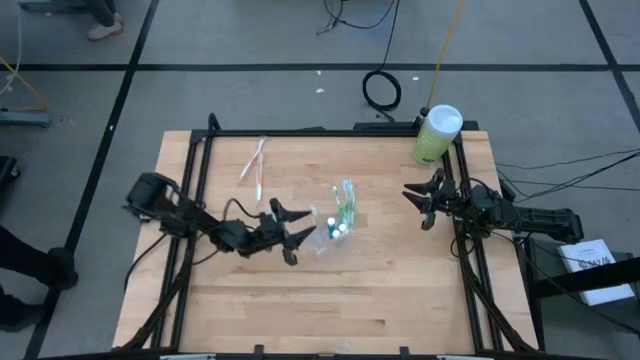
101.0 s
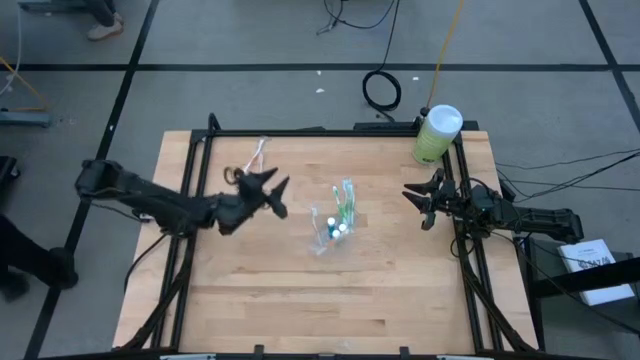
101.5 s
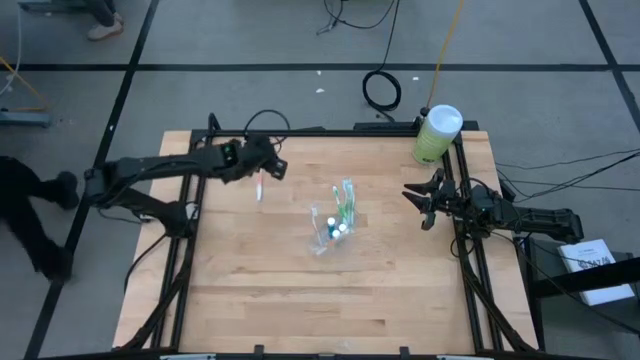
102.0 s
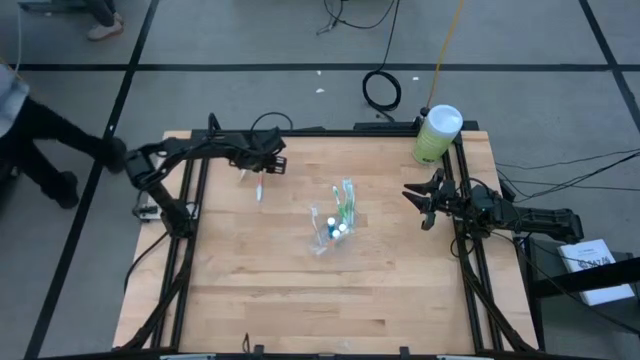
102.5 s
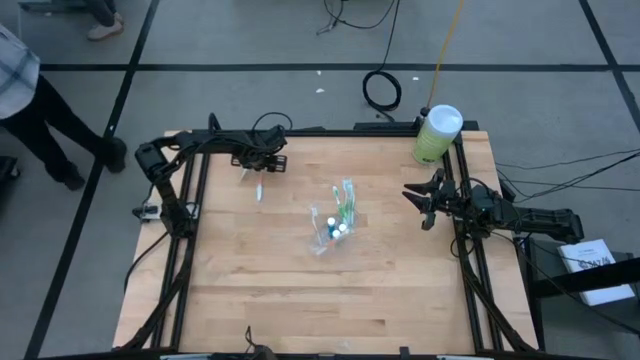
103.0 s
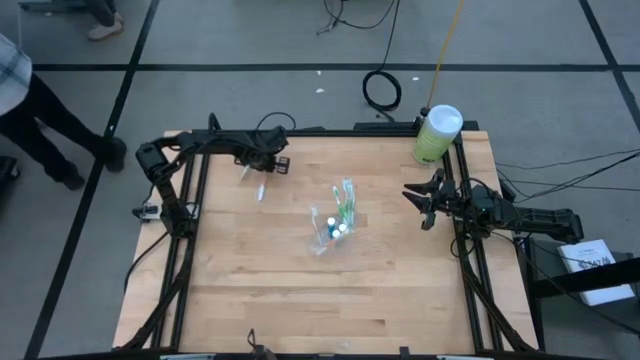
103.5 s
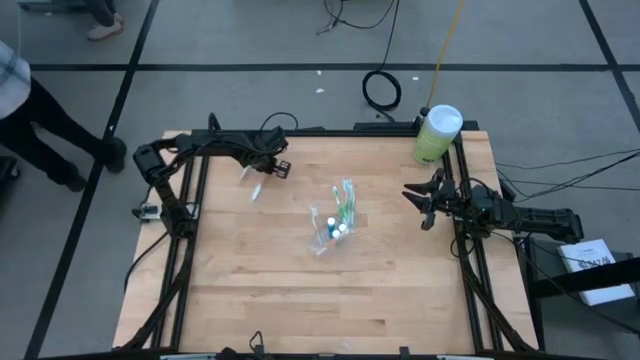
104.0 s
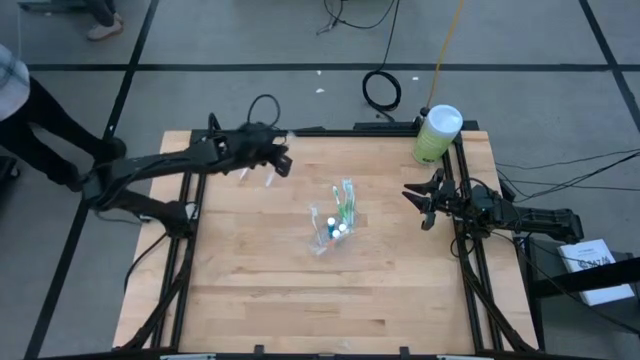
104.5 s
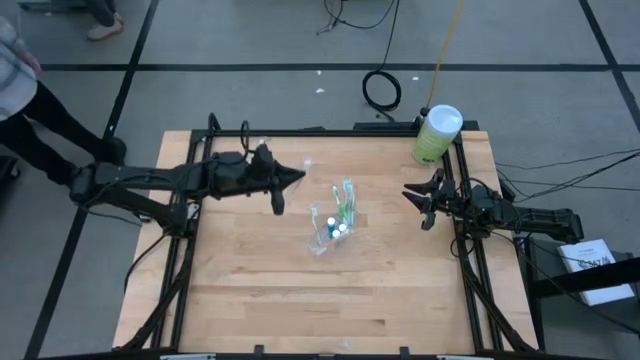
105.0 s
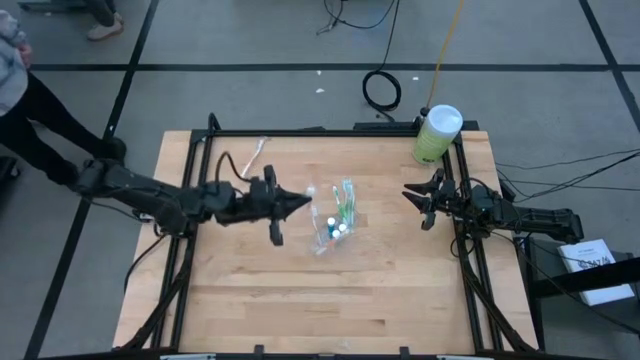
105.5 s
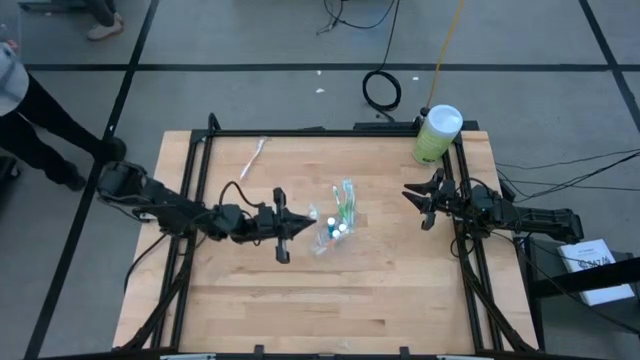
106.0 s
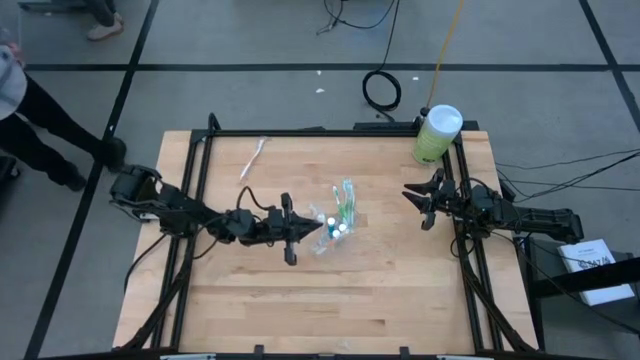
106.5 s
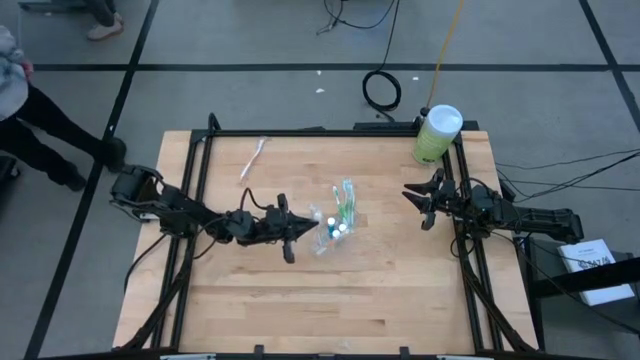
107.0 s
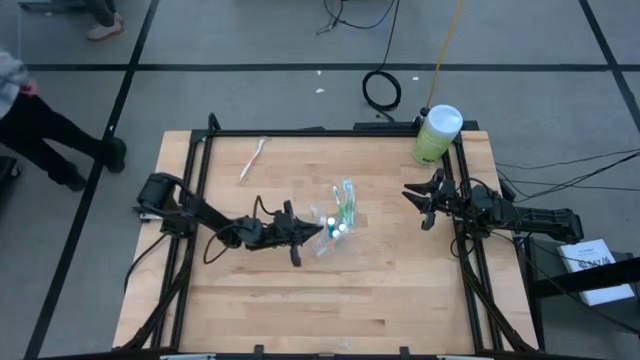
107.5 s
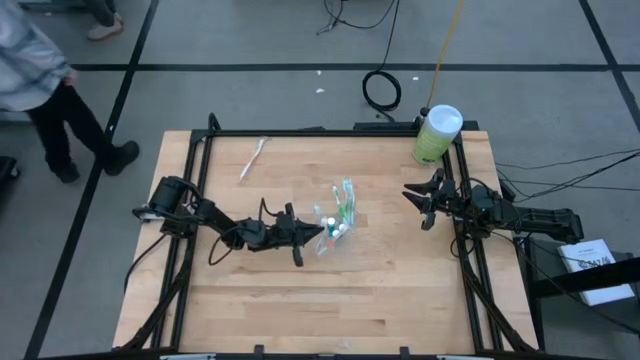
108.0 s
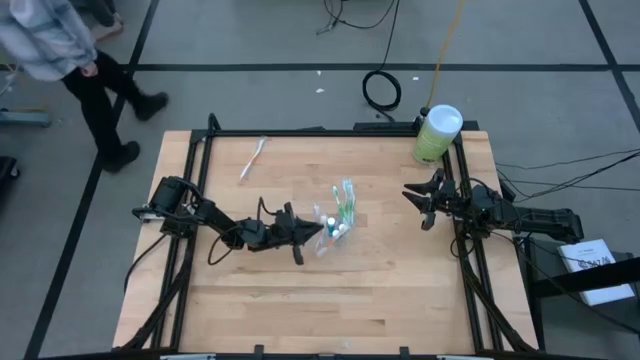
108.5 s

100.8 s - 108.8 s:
Task: Pick & Place toothbrushing station
Put the orange toothbrush into the transparent organizer

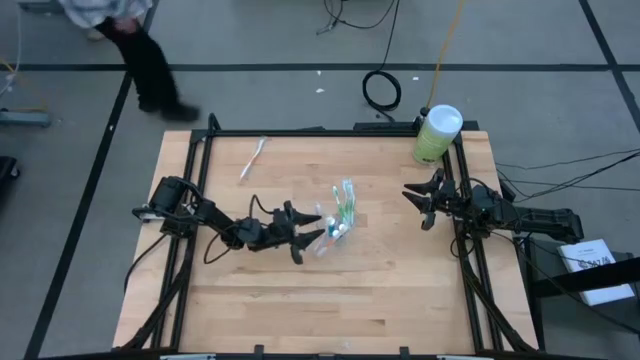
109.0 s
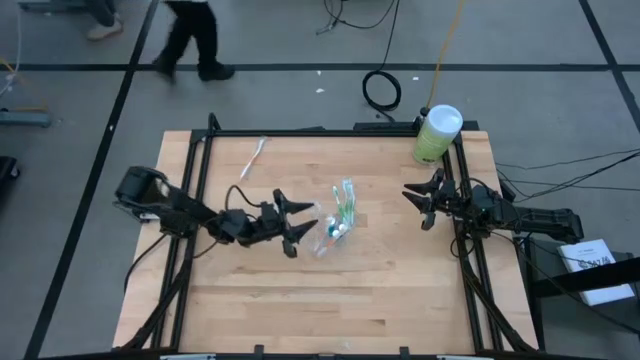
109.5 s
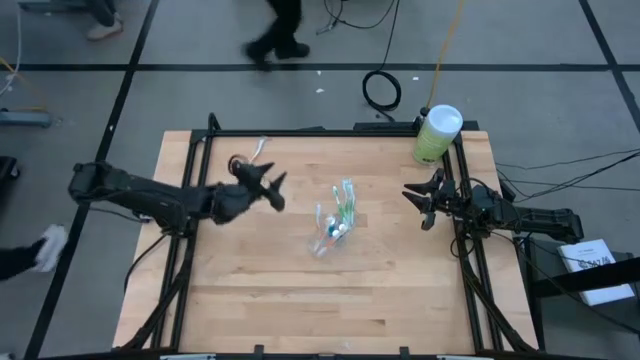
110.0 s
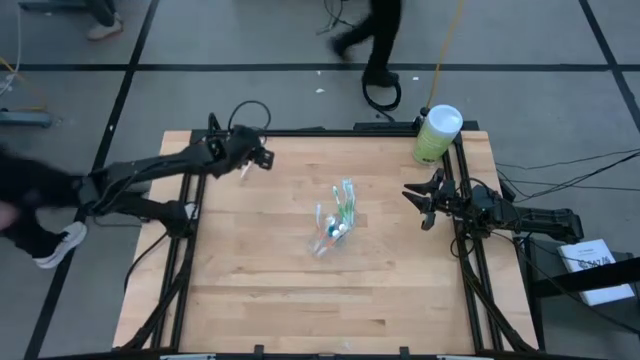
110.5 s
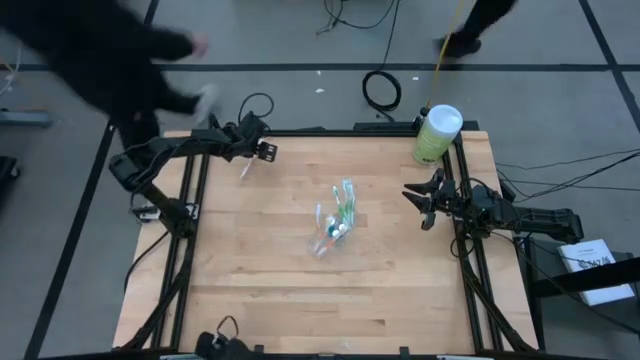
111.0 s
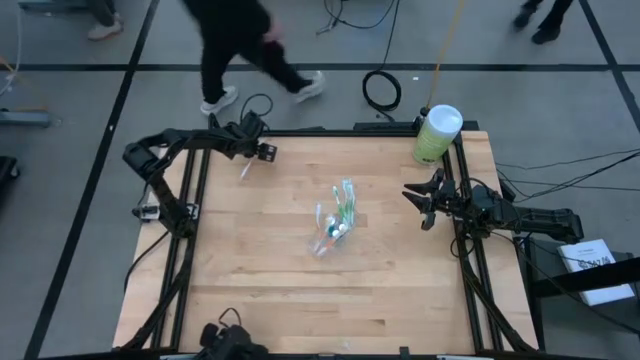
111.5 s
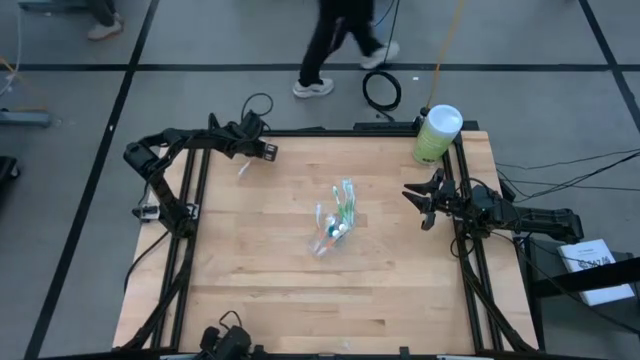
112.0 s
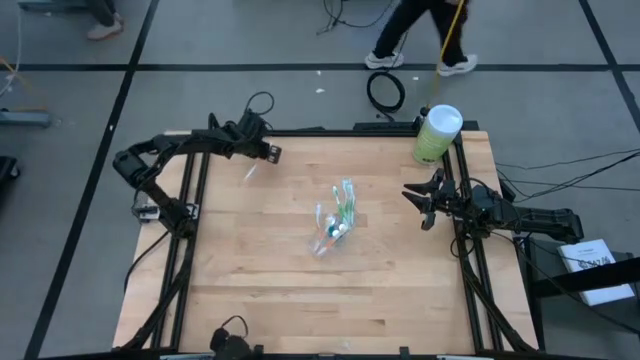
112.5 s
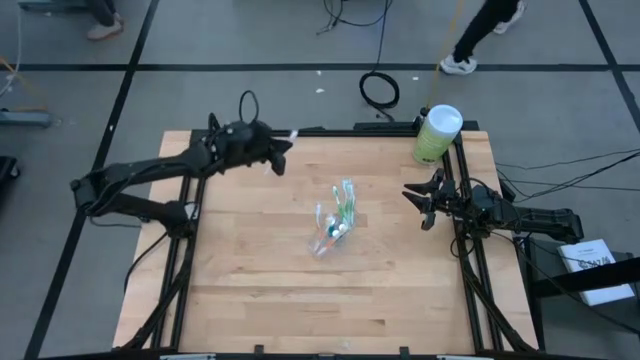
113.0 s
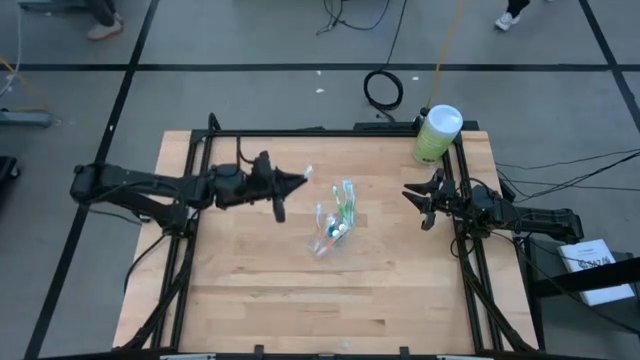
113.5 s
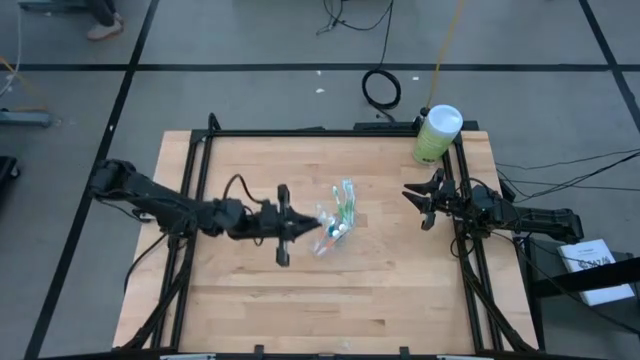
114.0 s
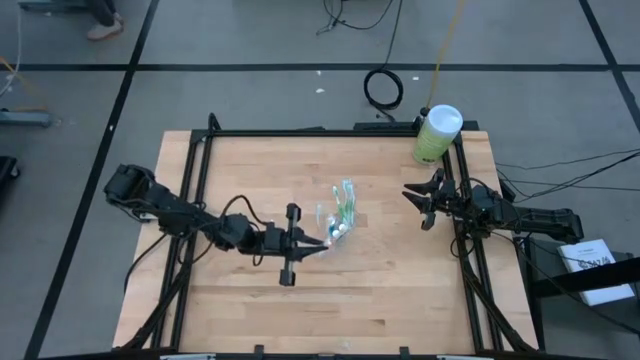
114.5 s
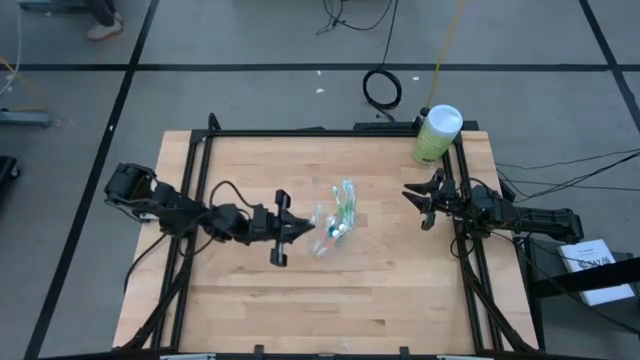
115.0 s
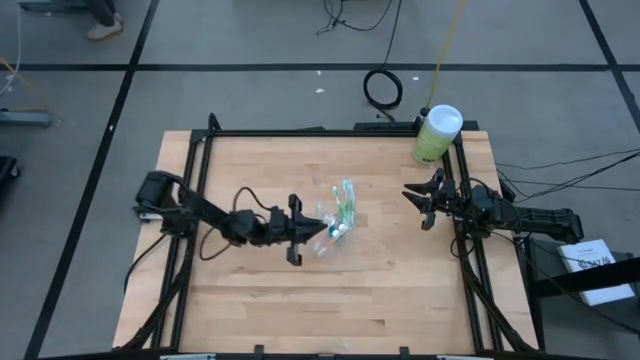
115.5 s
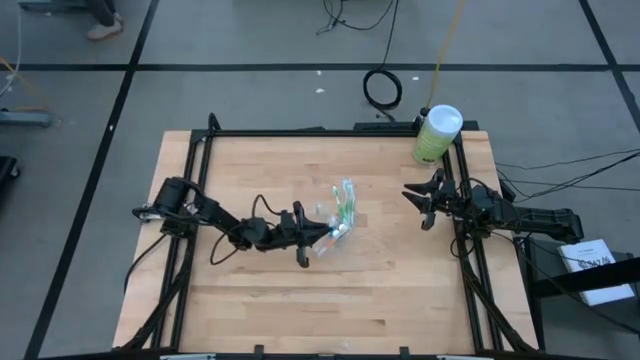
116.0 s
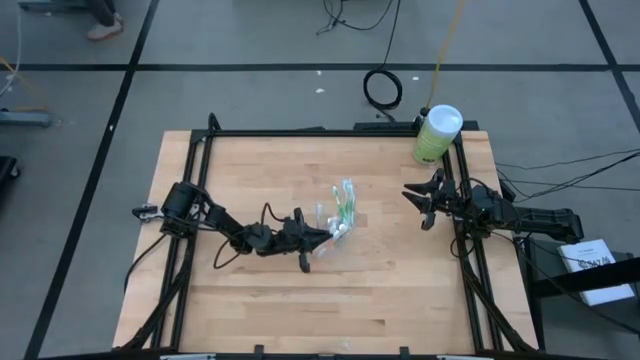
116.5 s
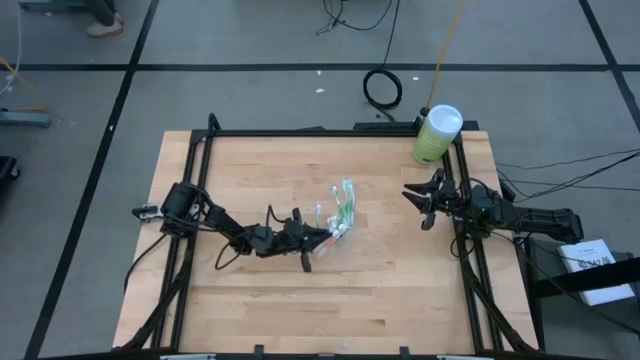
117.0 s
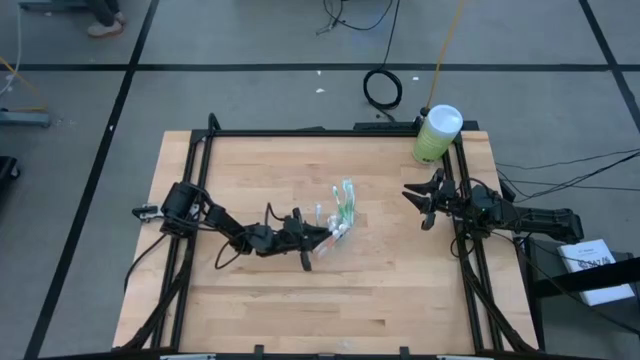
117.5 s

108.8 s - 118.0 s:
Put the orange toothbrush into the transparent organizer

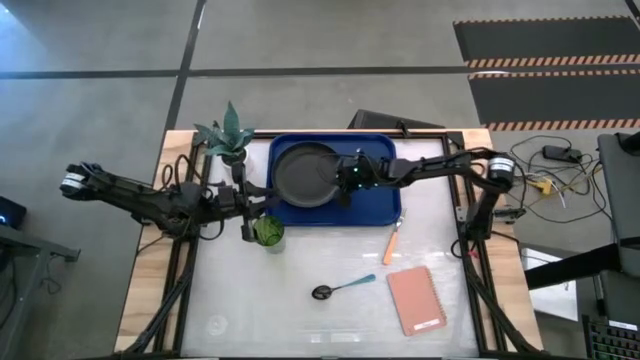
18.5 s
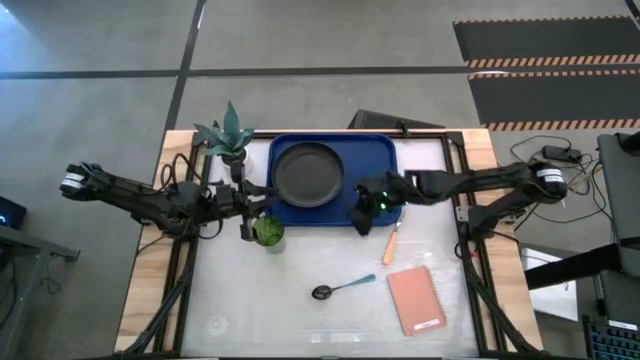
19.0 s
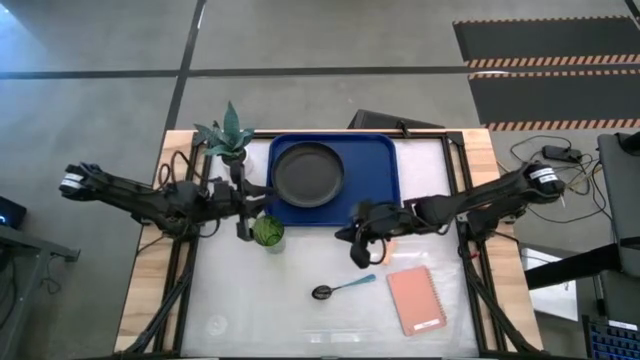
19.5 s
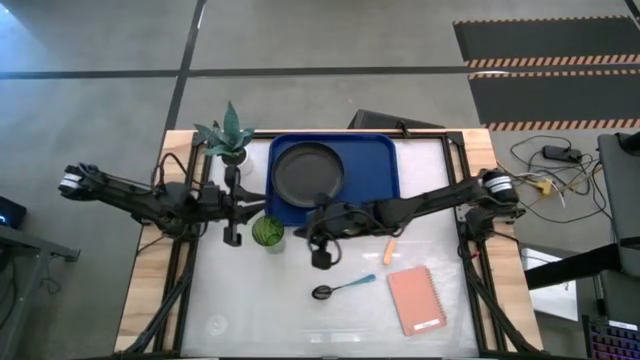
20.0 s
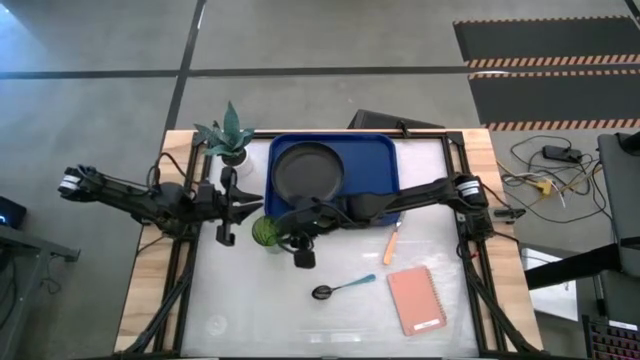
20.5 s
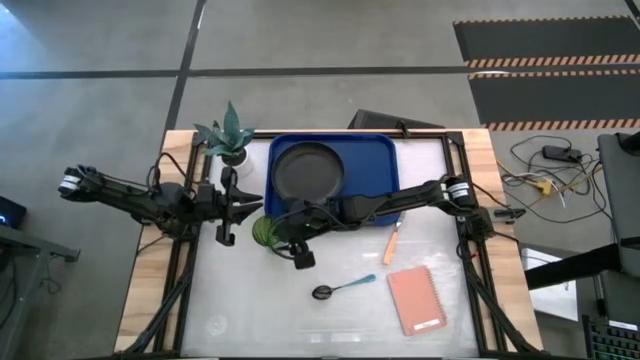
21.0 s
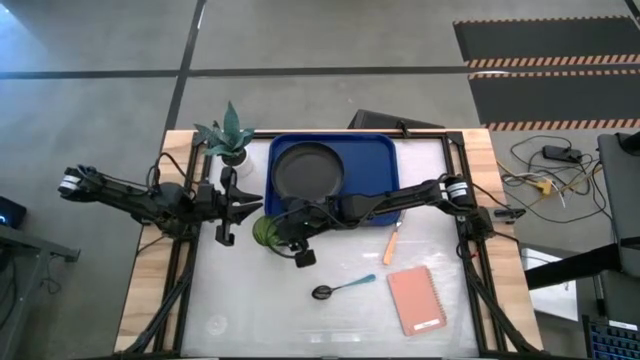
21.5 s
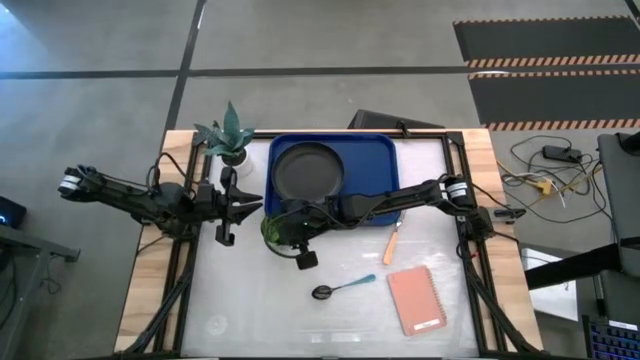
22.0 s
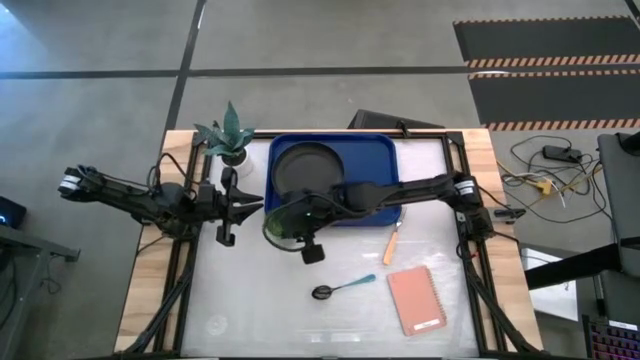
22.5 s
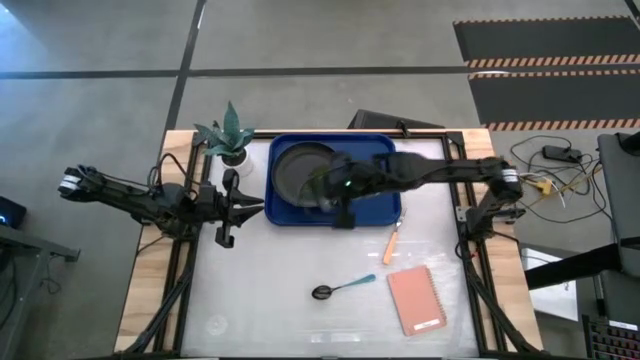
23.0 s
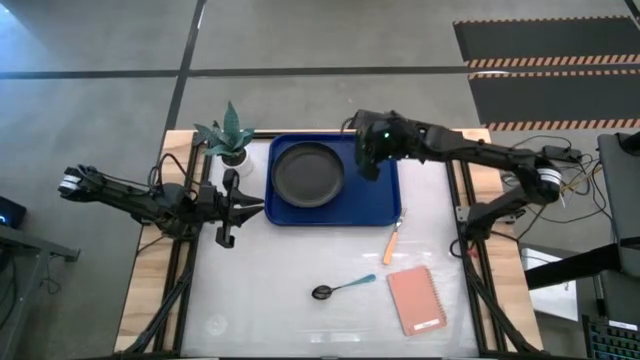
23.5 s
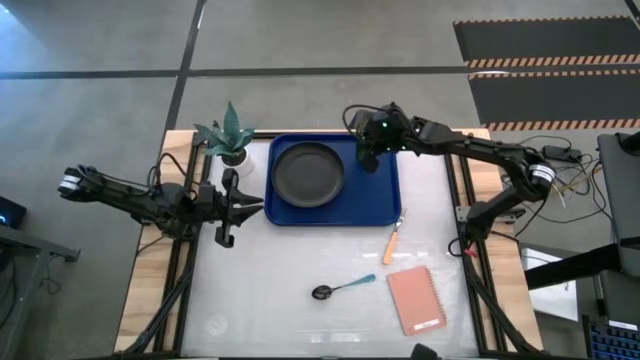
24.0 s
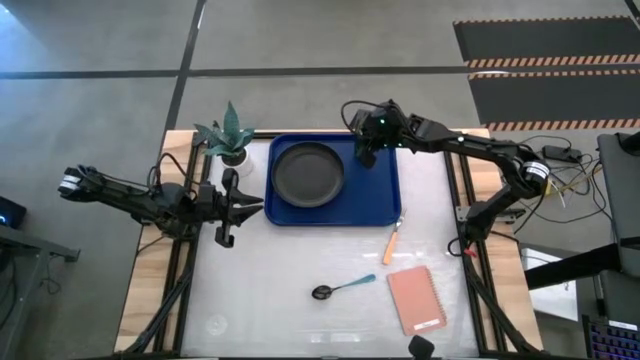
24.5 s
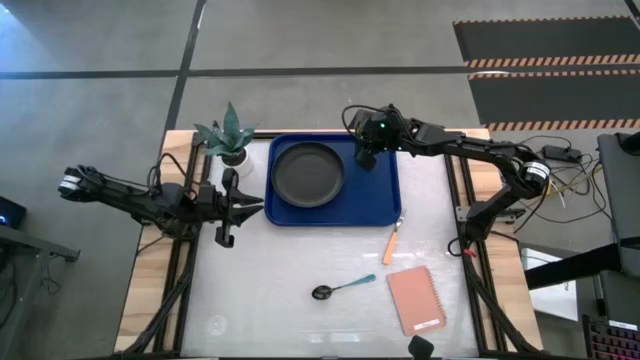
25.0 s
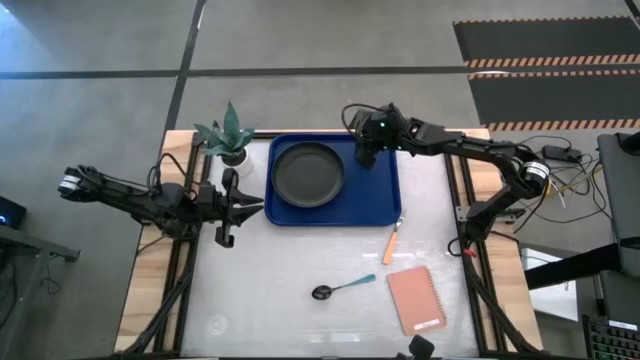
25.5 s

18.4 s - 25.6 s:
Task: Pick and place plate/cup/fork/spoon on tray
Put the green cup to the top right of the black plate on the blue tray
